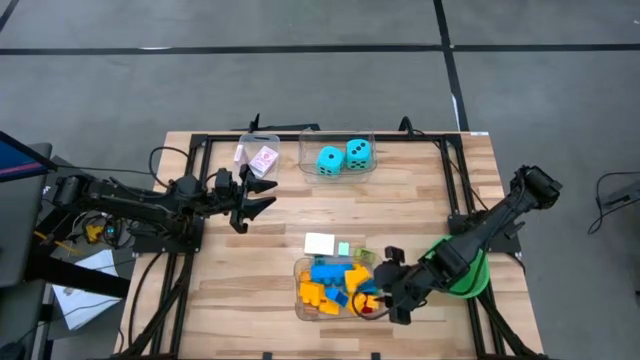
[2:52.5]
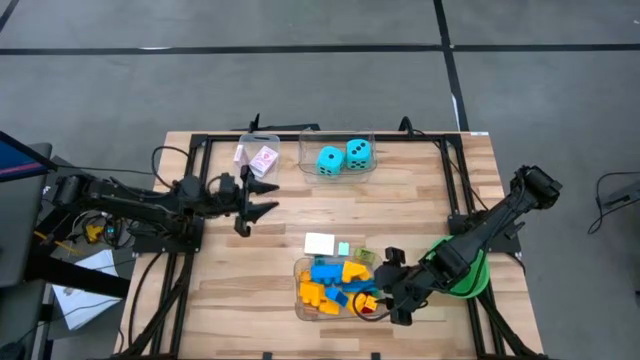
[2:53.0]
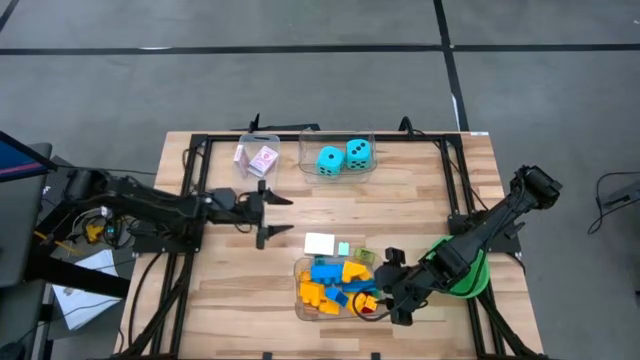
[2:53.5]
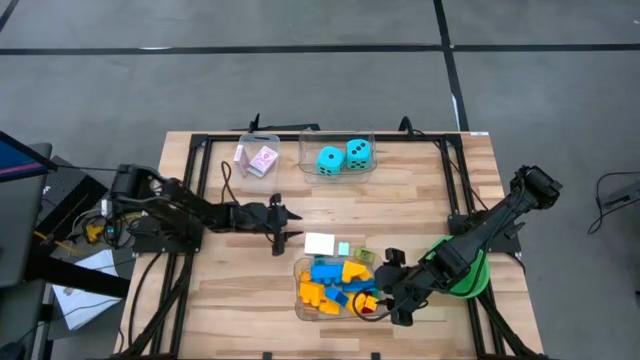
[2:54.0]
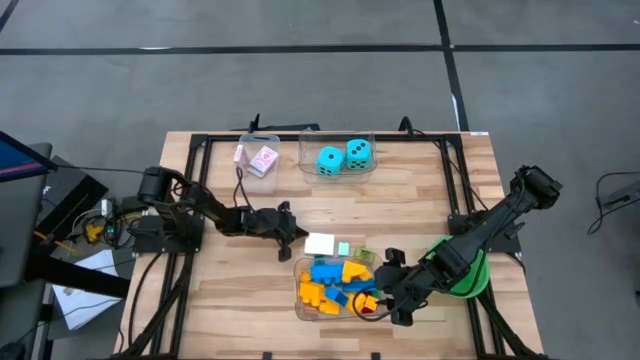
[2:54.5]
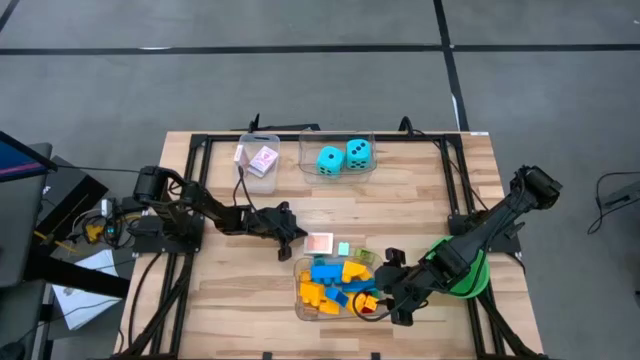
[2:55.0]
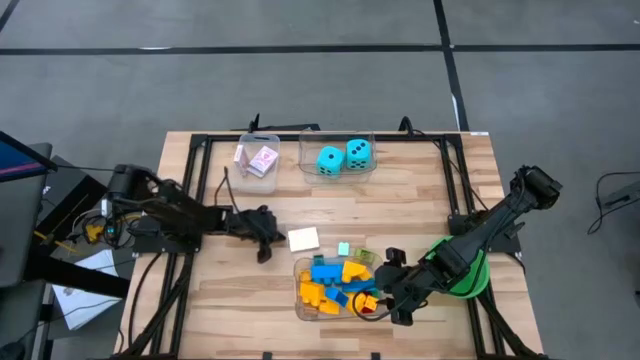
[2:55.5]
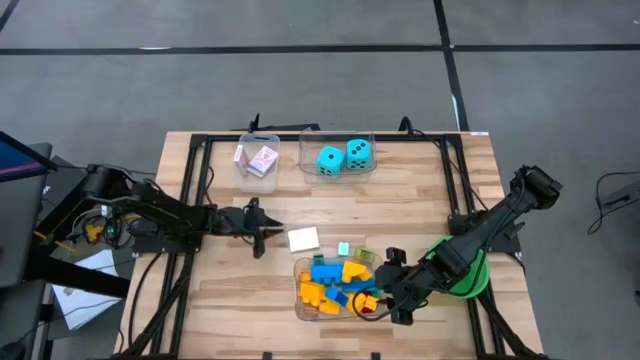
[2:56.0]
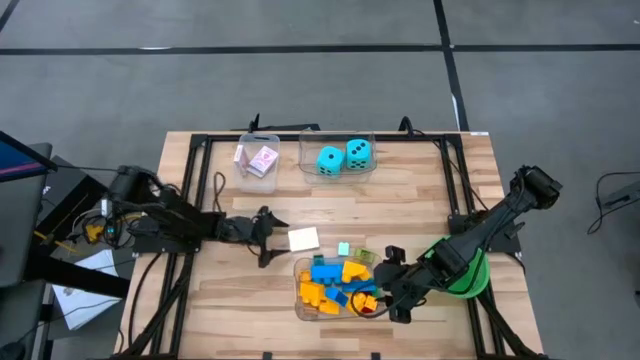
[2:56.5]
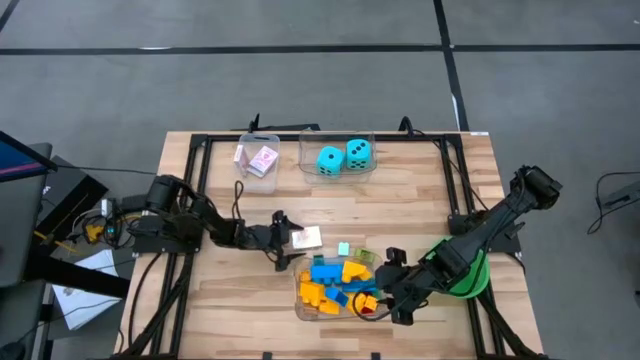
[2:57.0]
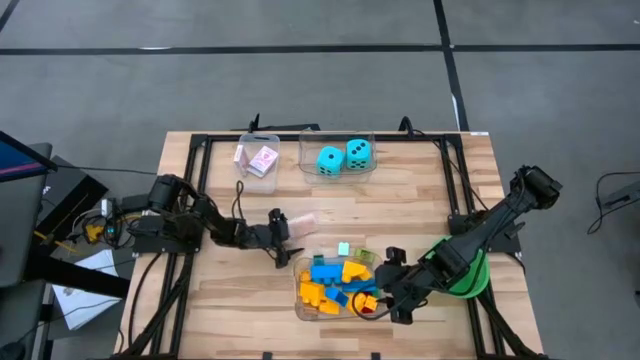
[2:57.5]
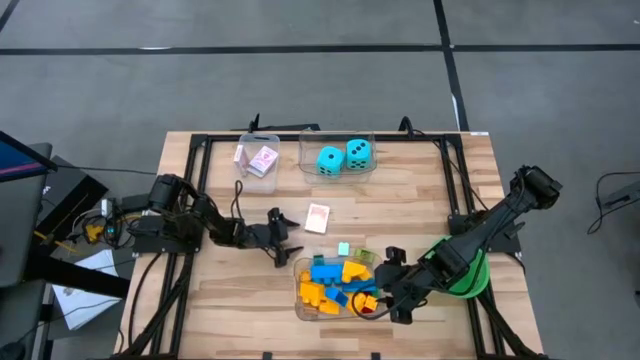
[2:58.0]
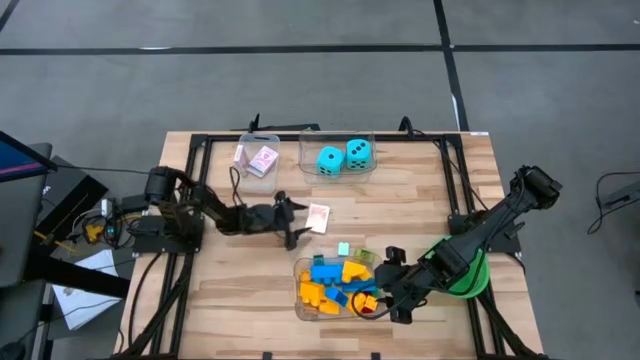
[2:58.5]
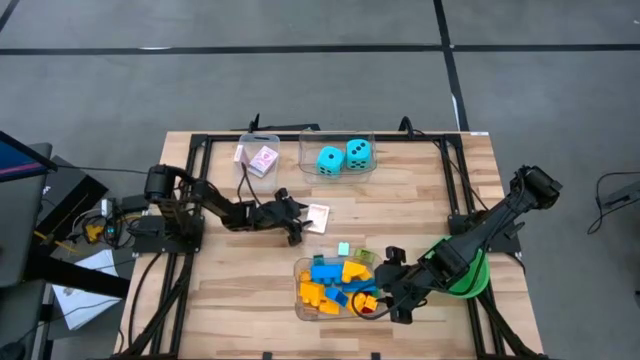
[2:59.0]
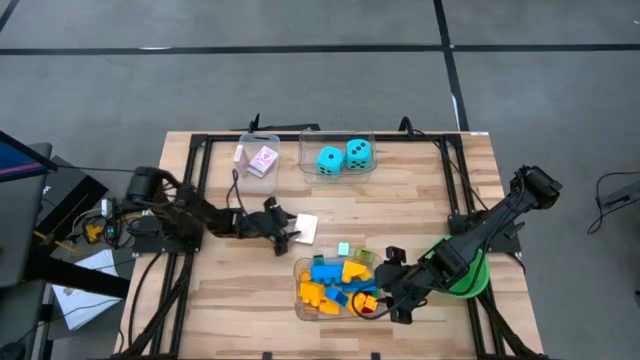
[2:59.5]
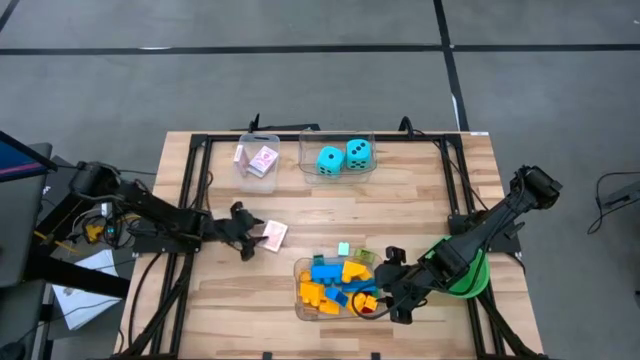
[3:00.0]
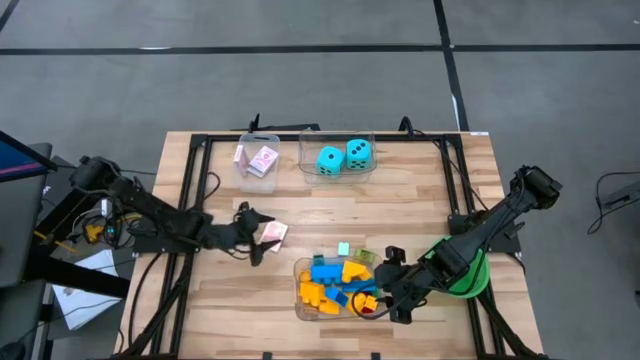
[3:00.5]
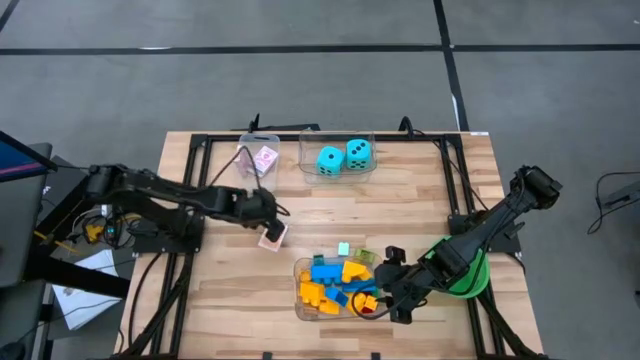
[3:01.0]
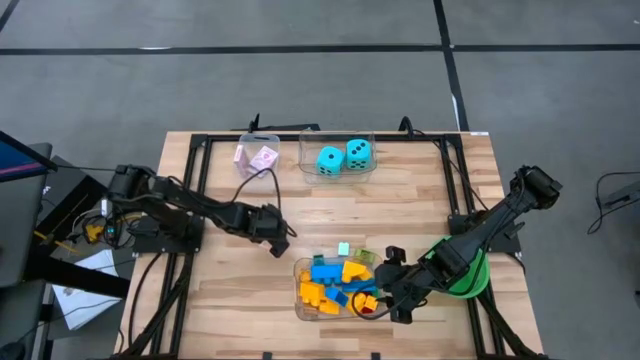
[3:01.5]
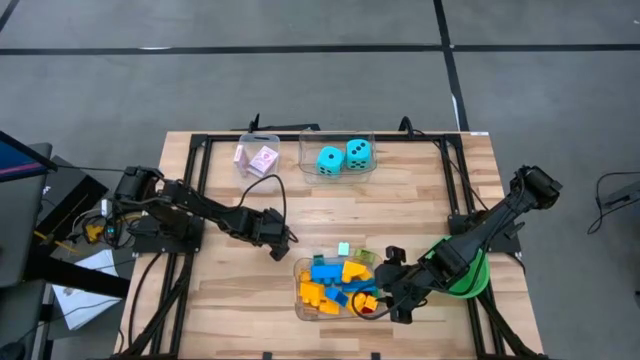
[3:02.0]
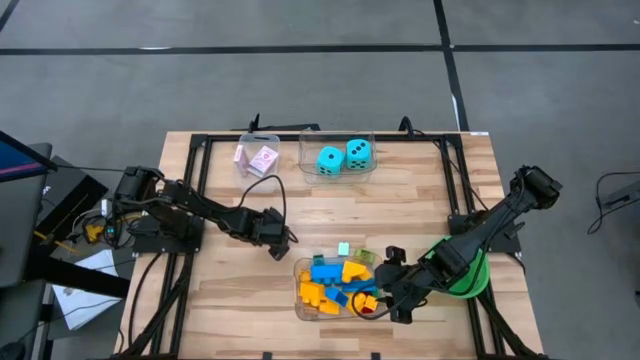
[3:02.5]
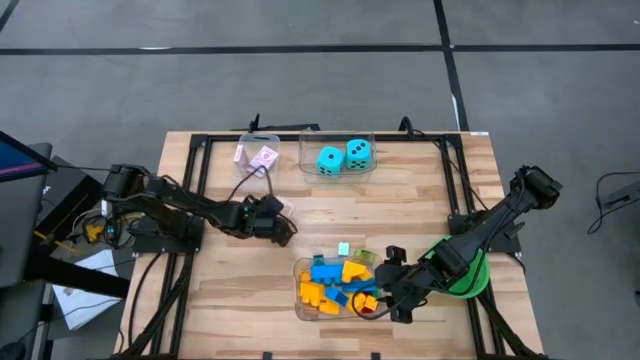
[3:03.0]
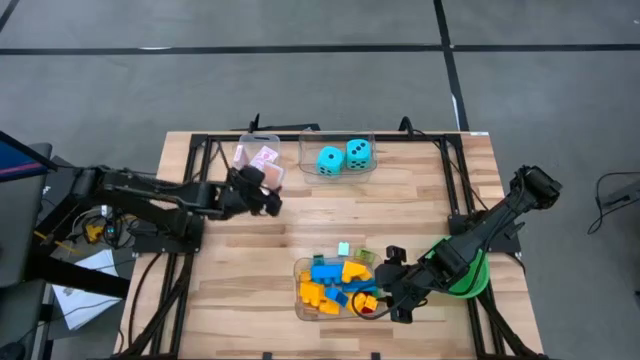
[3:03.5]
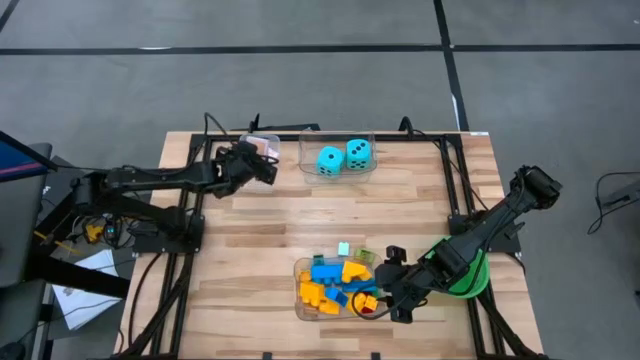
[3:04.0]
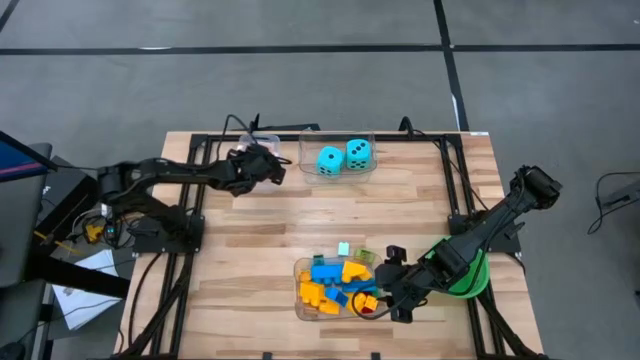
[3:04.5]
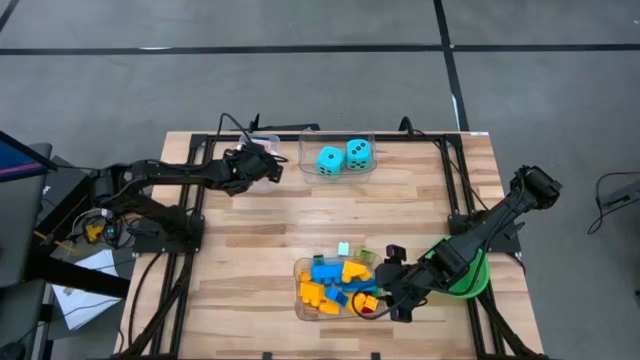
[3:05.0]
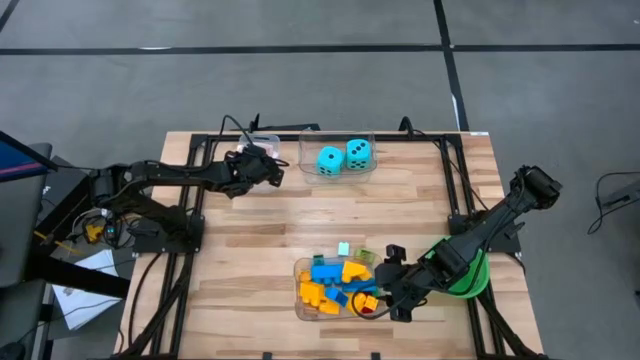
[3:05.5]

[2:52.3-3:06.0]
Task: Pick & Place Toys
Put the orange deck of cards box into the white bin

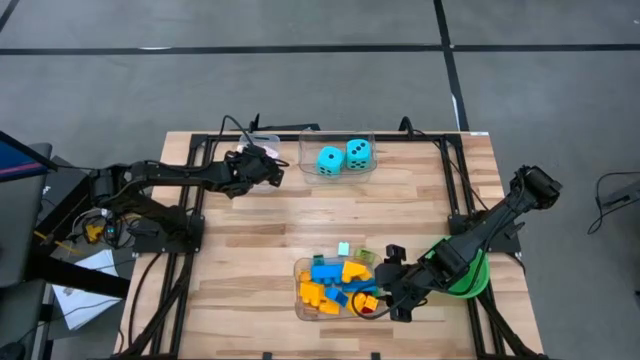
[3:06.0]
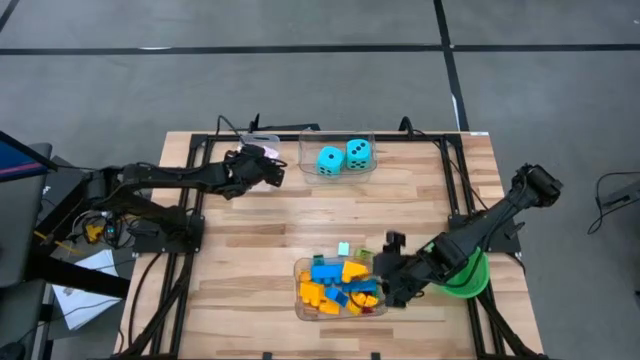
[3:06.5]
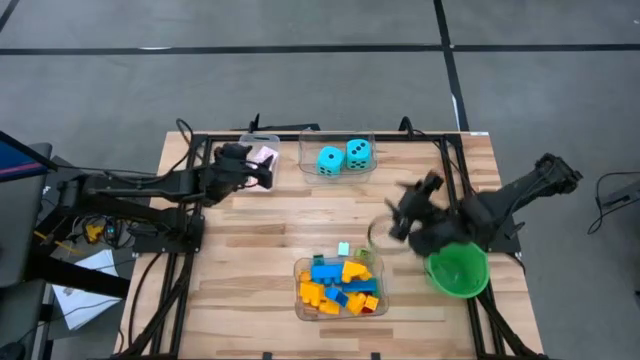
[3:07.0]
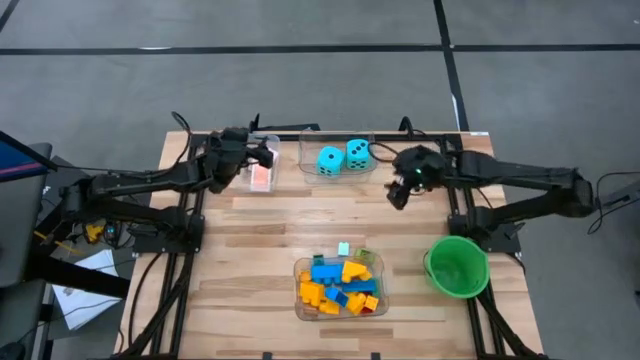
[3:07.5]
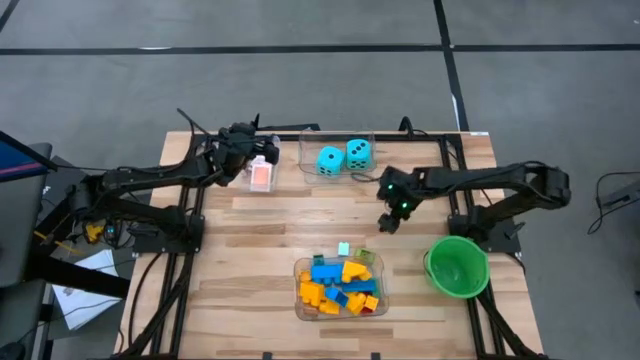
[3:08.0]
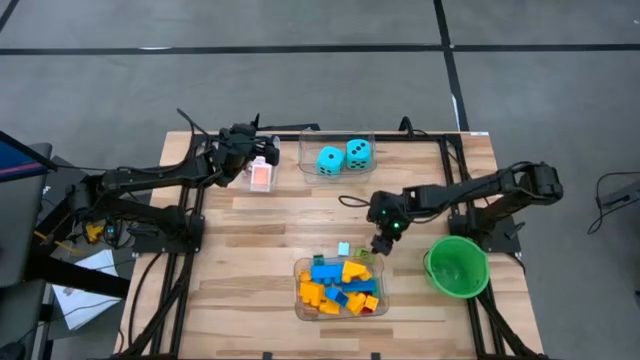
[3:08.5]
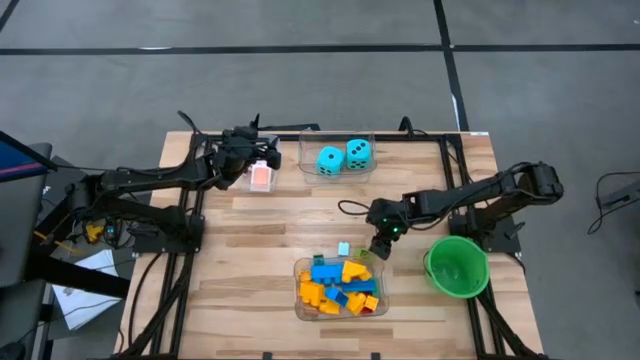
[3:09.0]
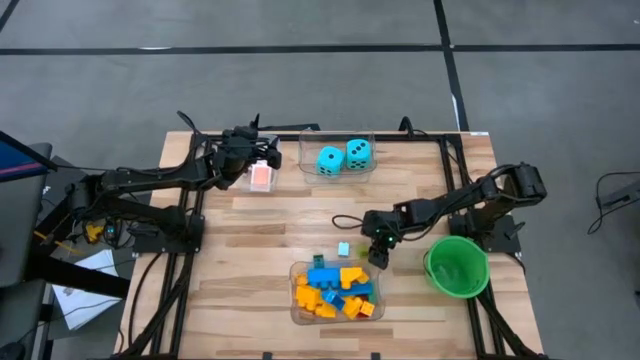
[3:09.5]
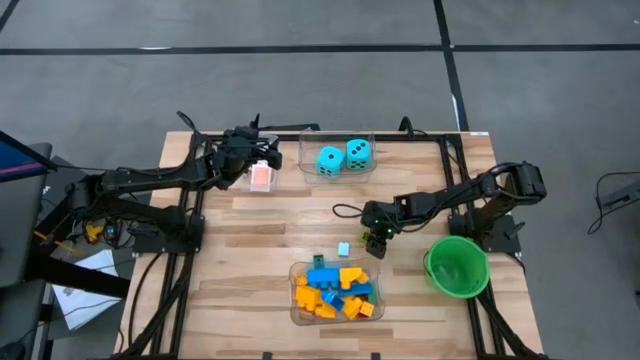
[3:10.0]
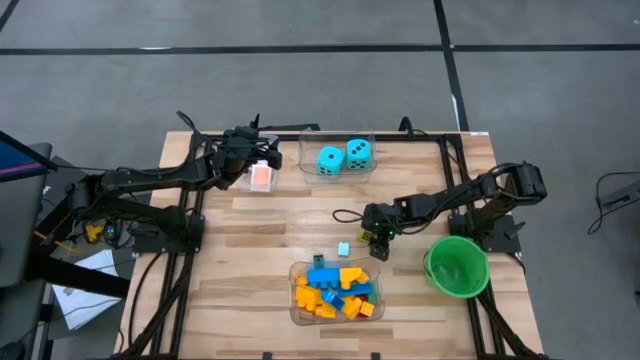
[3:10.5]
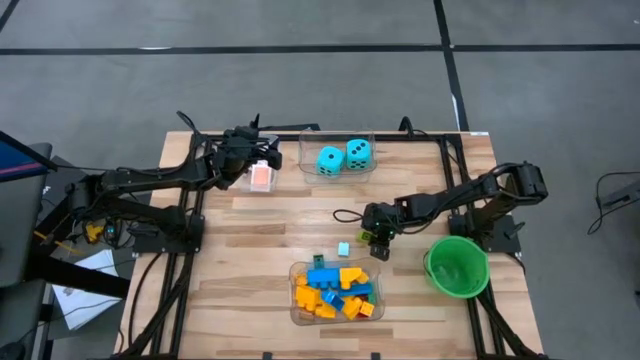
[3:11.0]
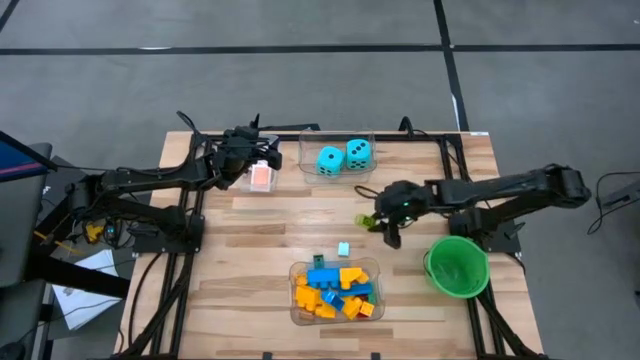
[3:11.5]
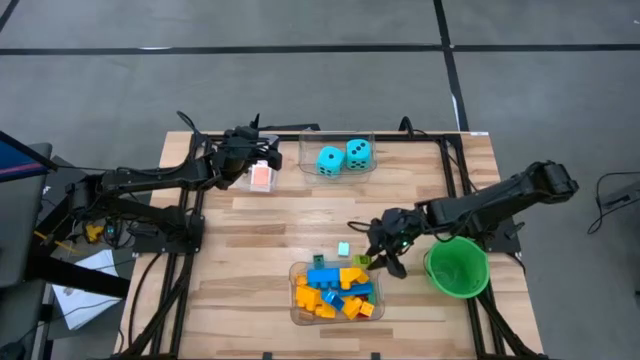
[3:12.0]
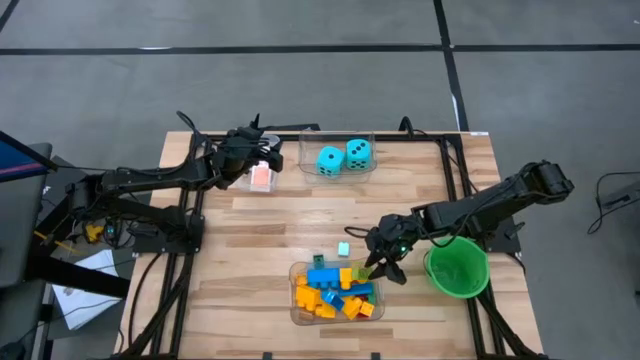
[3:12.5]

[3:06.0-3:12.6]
Put the light green game piece into the bottom transparent bin

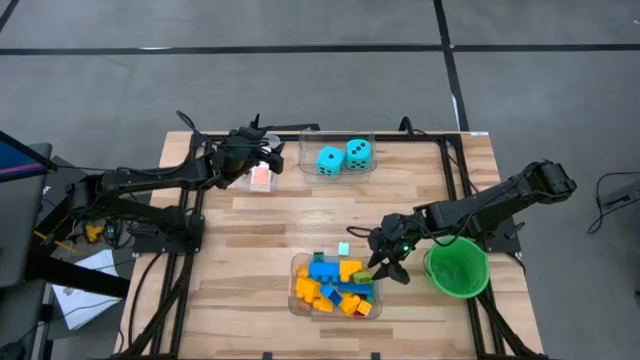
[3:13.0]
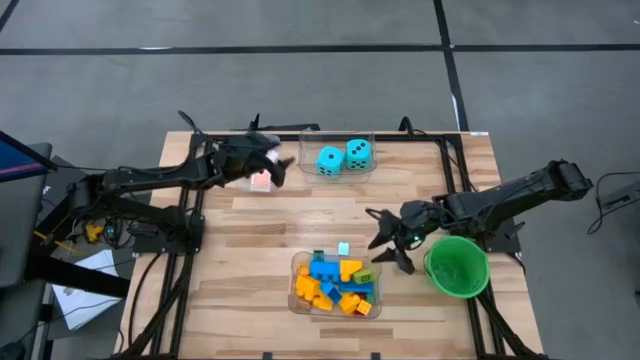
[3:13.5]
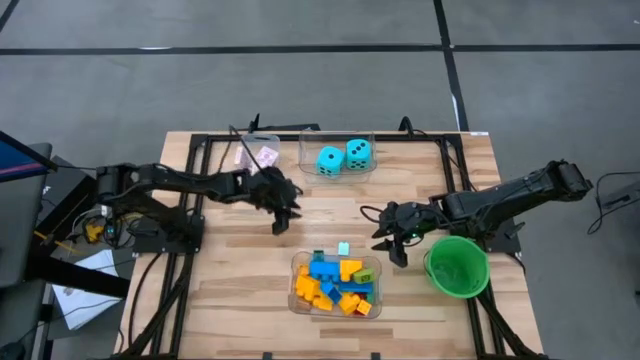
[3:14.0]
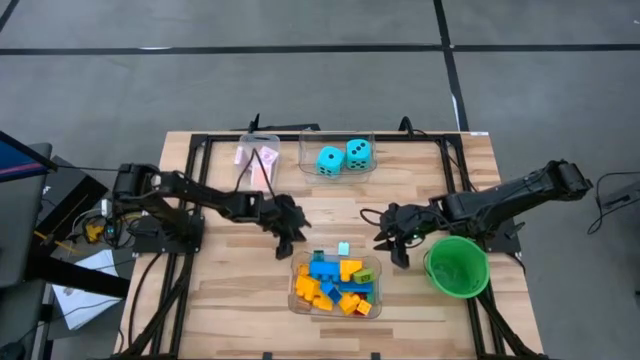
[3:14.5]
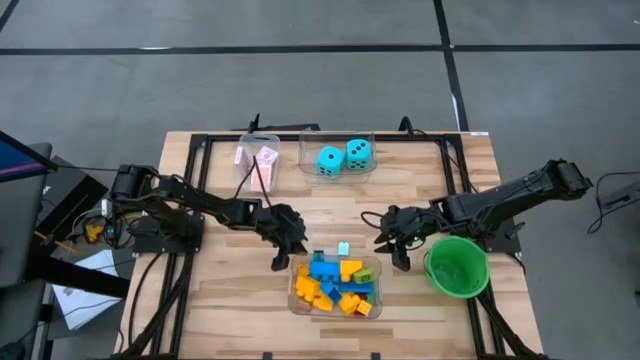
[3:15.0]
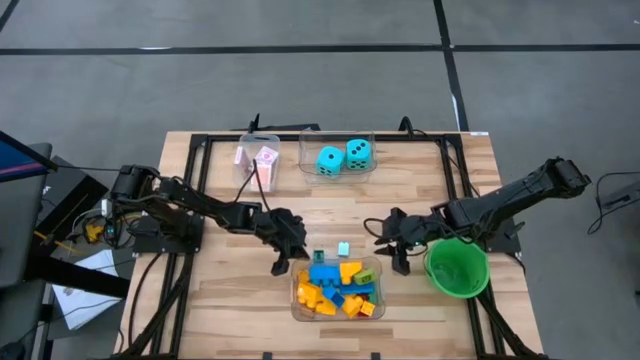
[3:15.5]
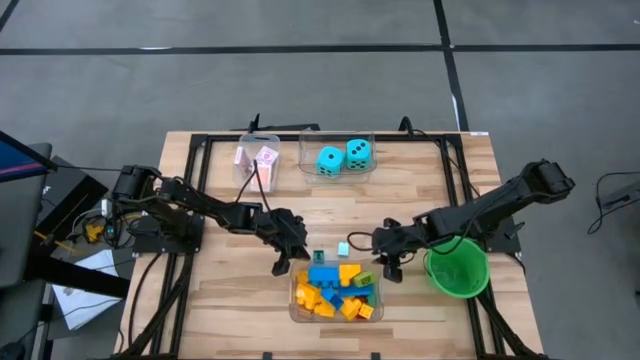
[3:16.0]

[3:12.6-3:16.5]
Adjust the bottom transparent bin
